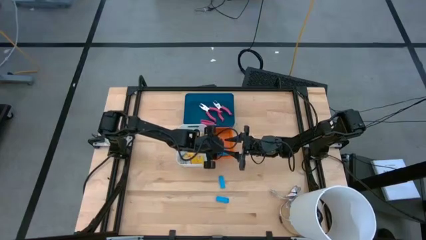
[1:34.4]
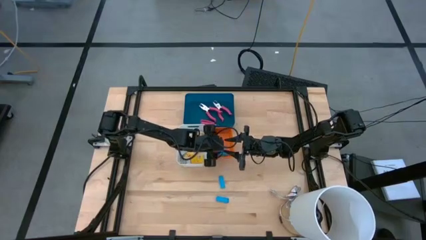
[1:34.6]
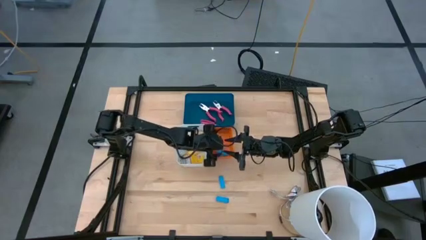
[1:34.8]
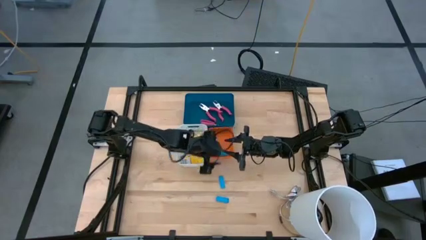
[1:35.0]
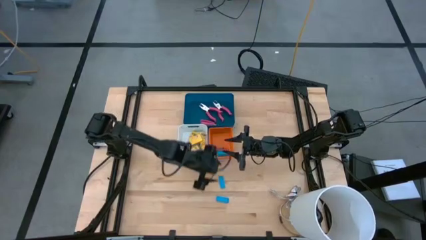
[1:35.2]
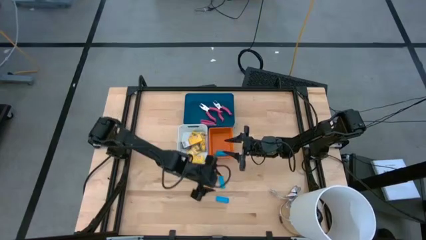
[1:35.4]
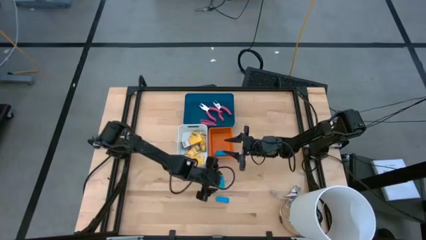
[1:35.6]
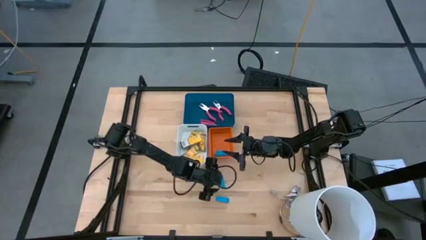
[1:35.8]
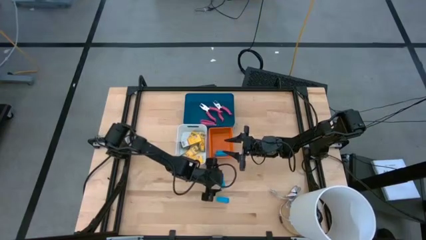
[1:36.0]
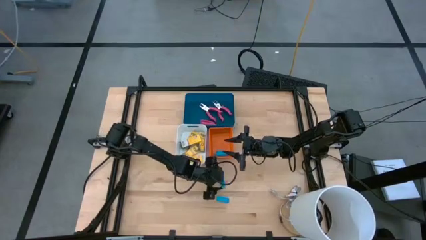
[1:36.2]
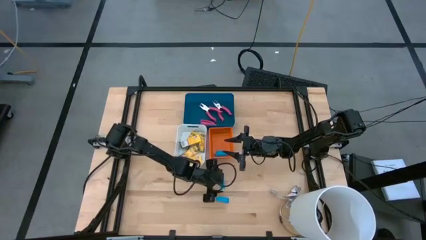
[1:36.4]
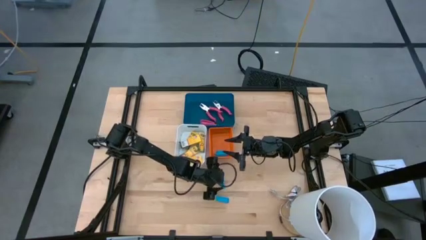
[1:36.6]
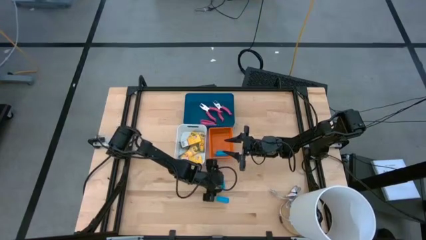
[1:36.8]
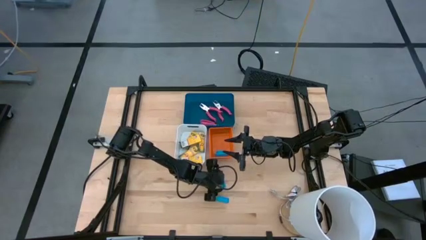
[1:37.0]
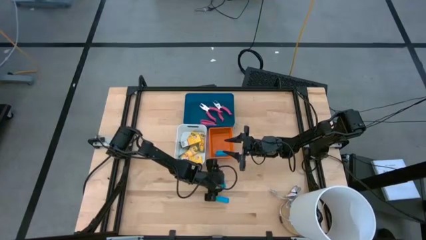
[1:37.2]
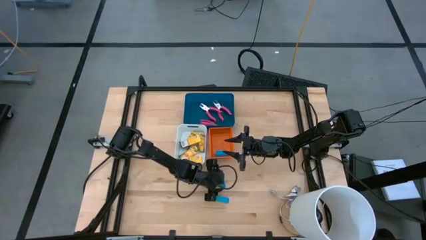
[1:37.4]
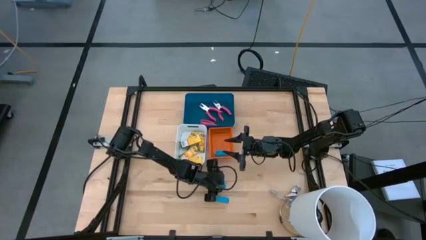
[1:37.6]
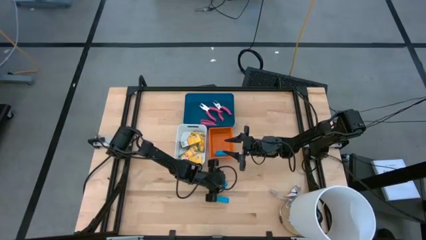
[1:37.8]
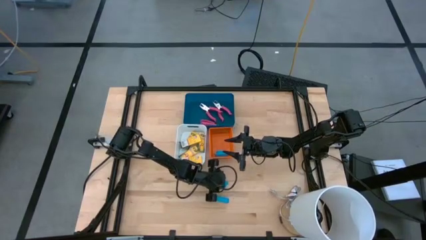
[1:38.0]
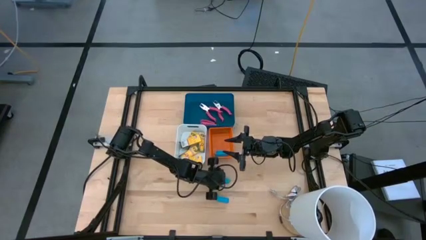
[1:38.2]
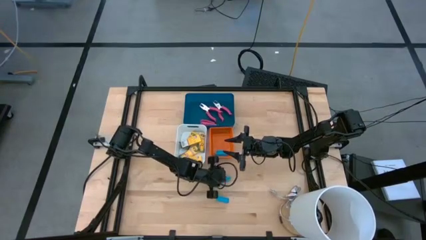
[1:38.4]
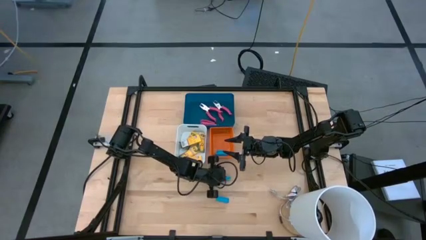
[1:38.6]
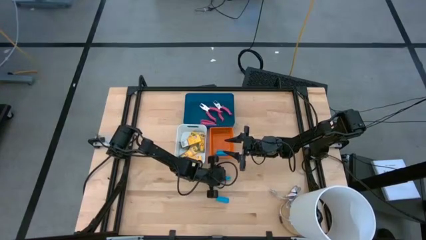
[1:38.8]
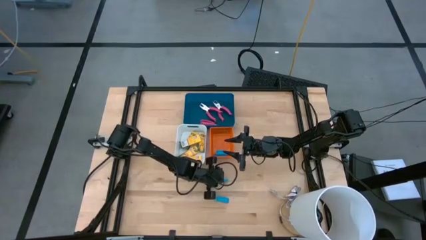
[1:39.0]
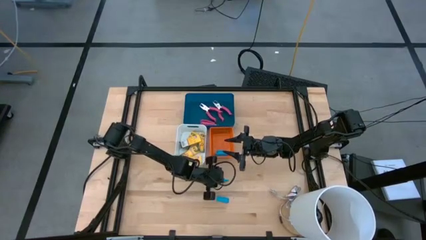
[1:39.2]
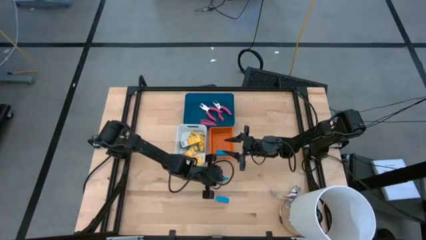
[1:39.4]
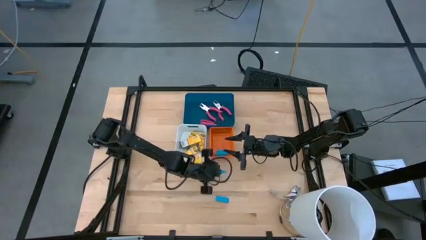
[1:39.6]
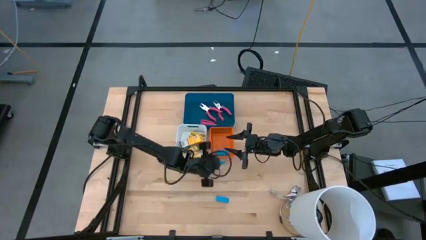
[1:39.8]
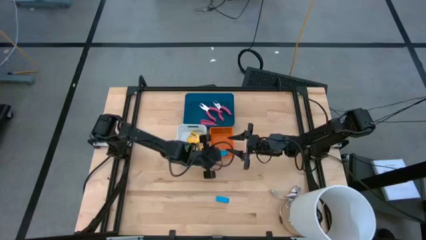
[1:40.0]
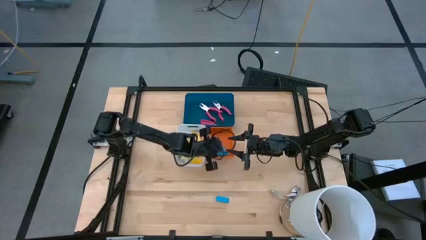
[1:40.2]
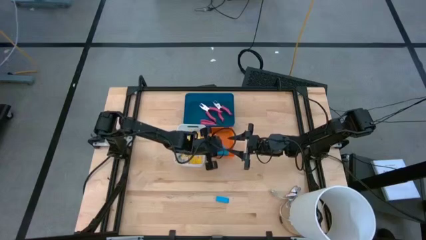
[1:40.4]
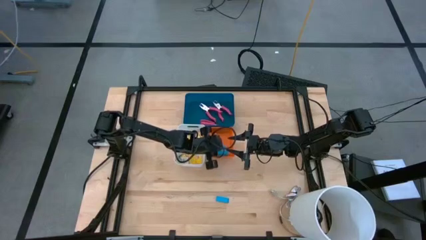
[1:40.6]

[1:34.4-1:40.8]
Task: Pick & Place School Supplies
Put the blue eraser into the orange bin

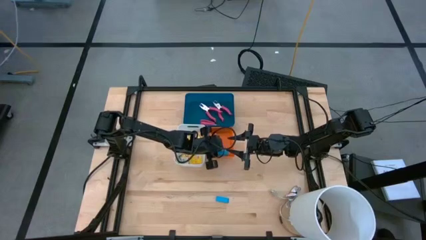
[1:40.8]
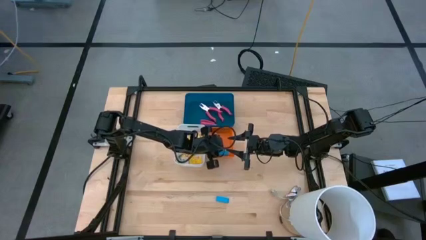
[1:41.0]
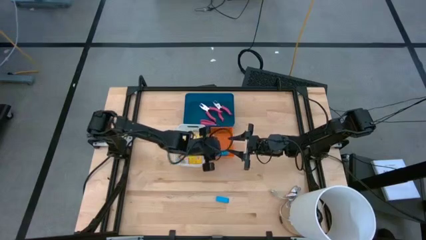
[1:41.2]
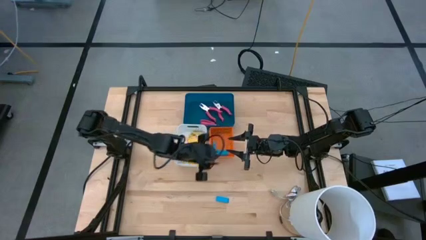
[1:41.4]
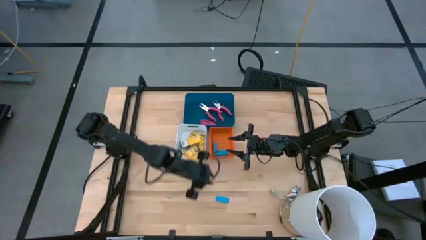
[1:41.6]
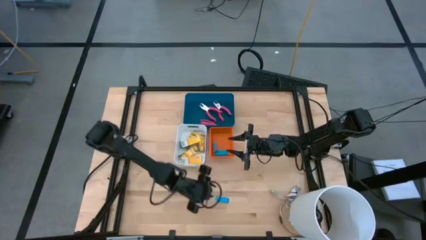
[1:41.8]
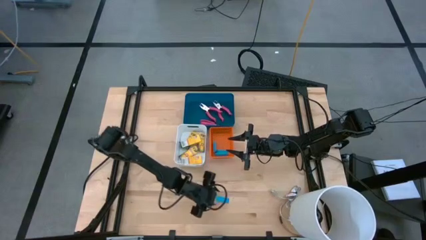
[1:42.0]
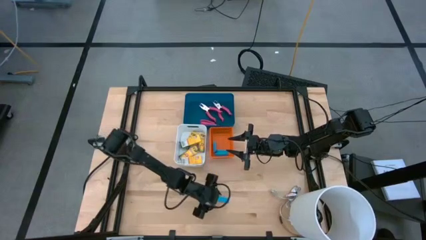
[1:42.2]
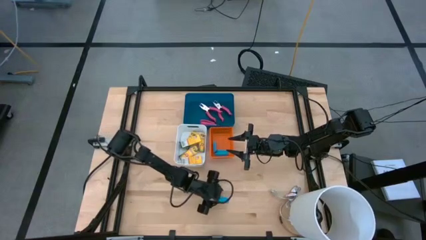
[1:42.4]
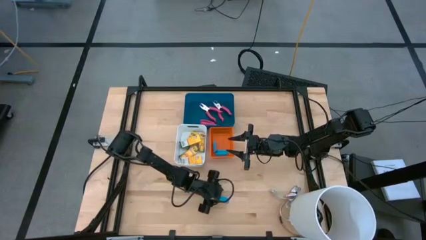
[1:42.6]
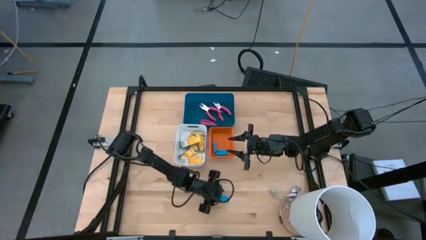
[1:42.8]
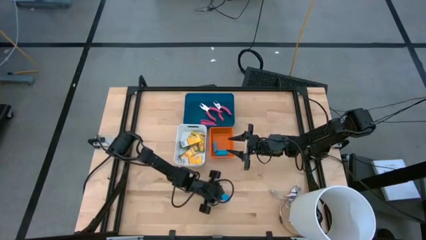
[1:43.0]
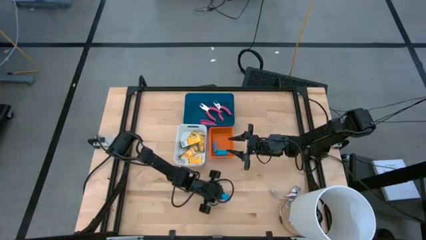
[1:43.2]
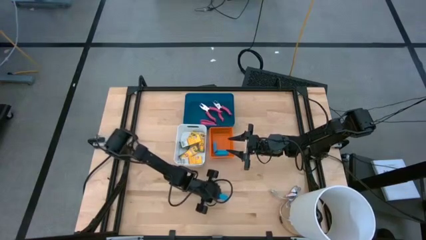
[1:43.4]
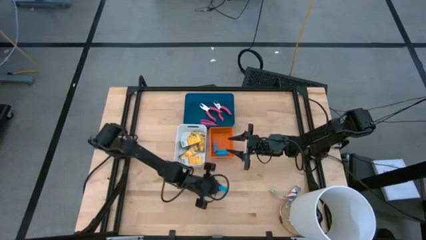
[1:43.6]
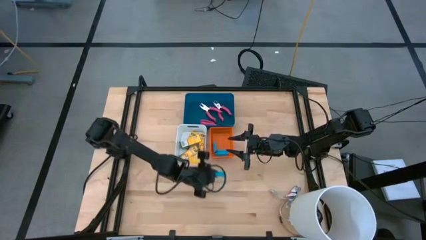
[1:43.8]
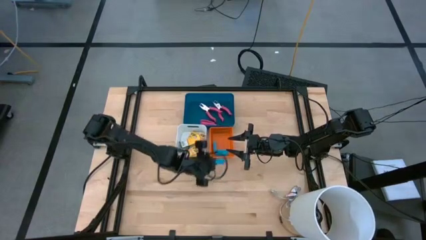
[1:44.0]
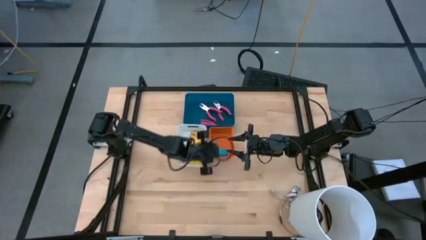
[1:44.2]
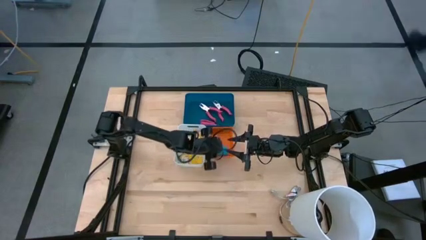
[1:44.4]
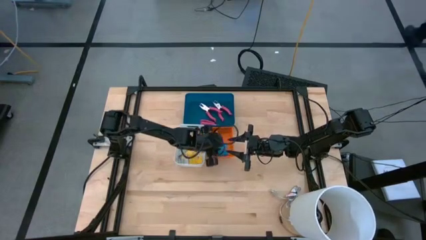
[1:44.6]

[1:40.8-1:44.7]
Put the blue eraser into the orange bin

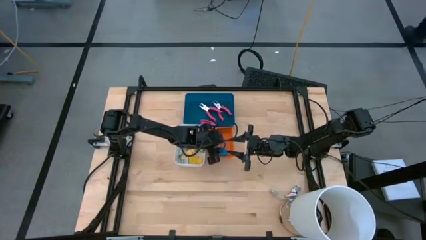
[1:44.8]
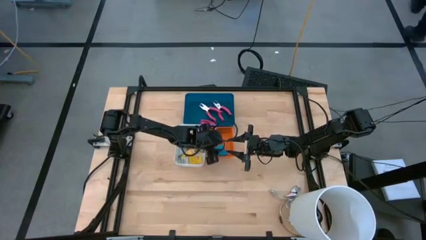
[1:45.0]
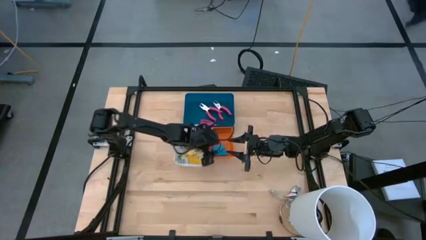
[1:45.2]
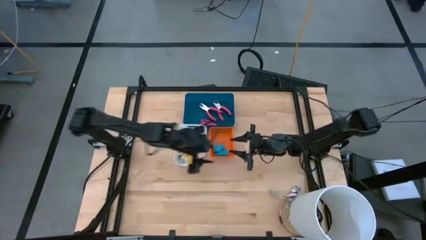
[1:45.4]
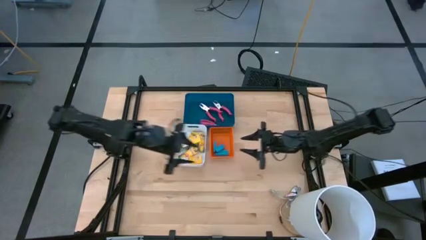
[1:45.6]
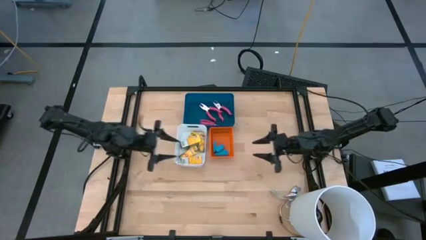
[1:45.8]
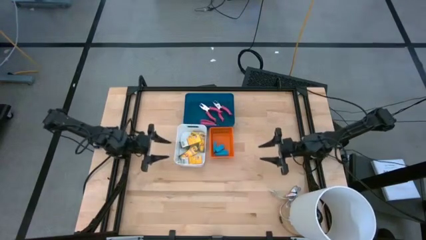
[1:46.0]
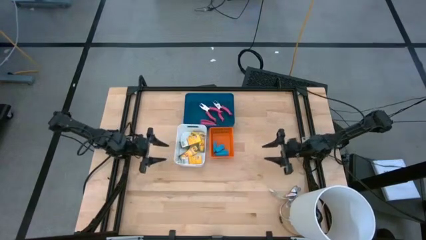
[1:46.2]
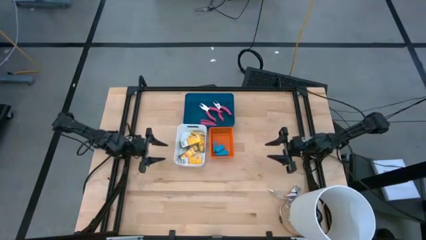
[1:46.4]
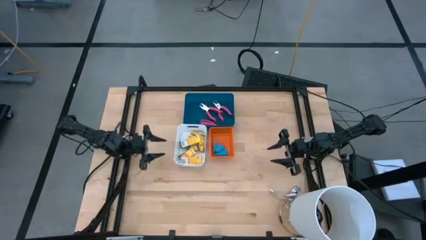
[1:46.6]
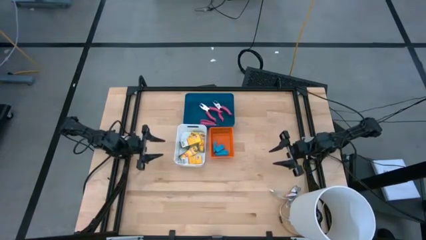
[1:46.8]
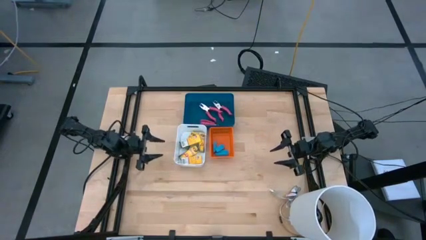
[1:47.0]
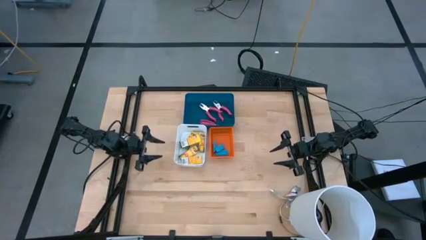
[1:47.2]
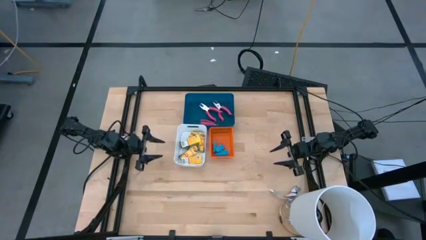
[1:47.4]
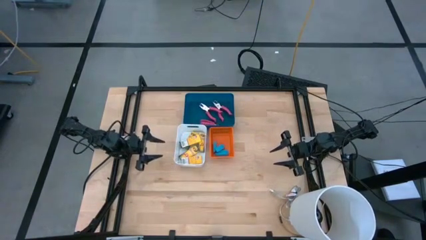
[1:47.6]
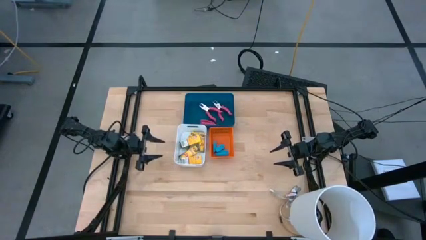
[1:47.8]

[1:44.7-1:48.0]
Return to Home Position

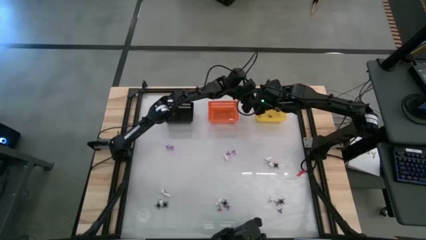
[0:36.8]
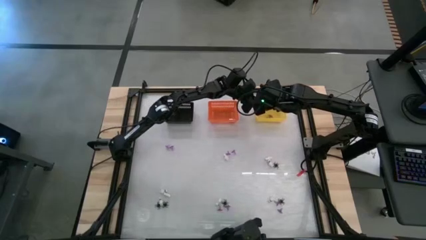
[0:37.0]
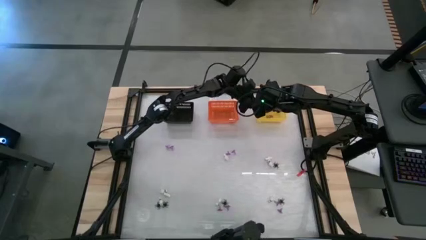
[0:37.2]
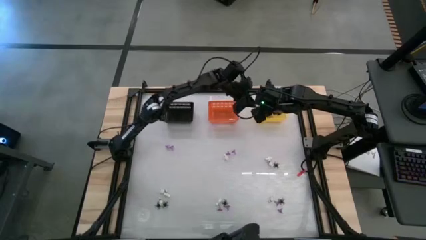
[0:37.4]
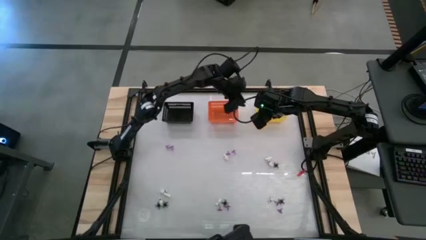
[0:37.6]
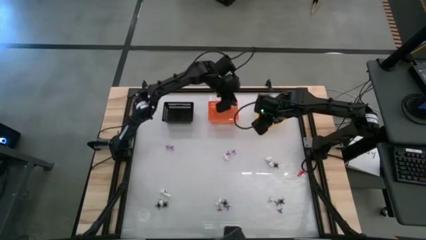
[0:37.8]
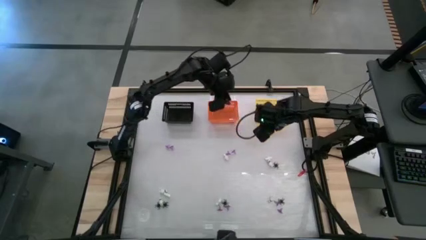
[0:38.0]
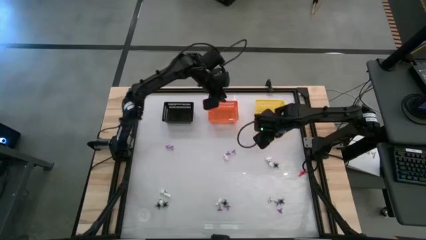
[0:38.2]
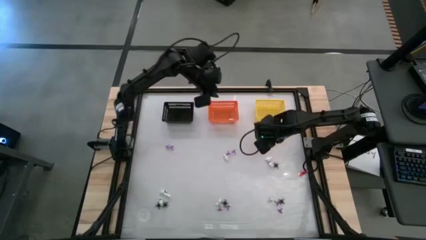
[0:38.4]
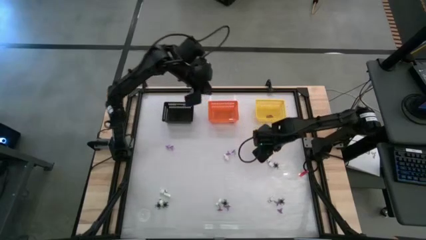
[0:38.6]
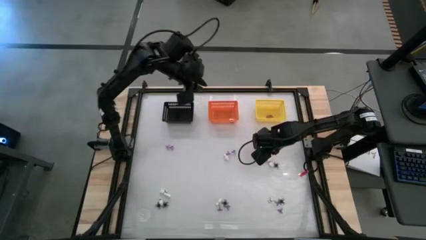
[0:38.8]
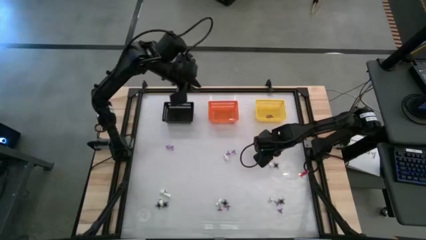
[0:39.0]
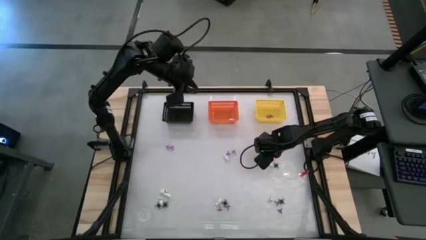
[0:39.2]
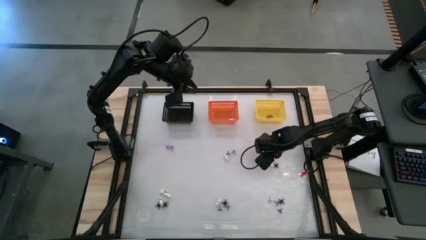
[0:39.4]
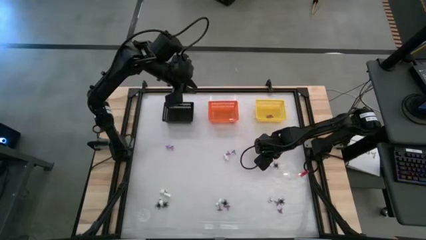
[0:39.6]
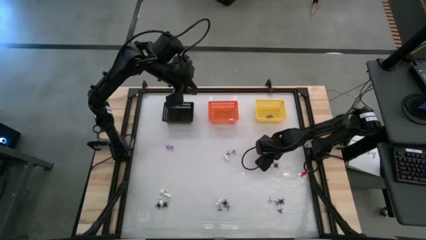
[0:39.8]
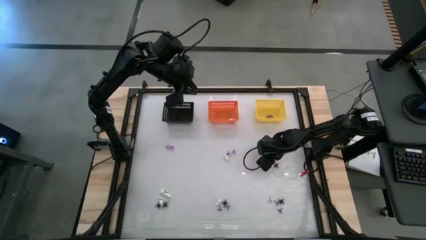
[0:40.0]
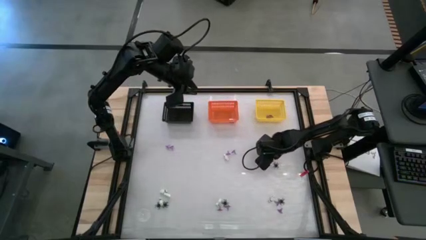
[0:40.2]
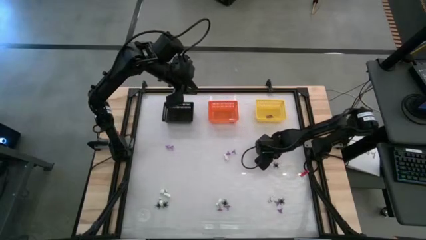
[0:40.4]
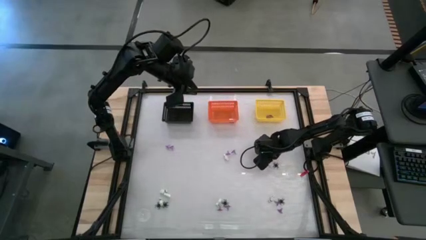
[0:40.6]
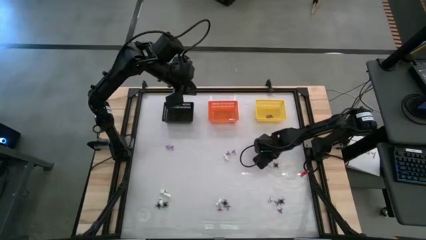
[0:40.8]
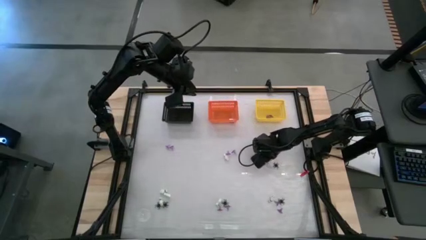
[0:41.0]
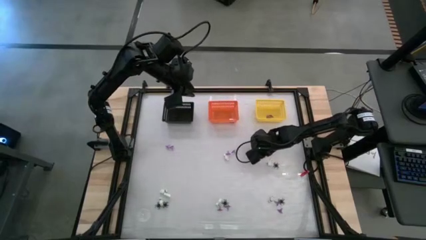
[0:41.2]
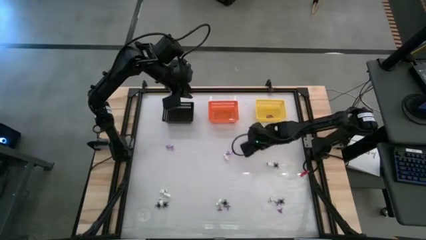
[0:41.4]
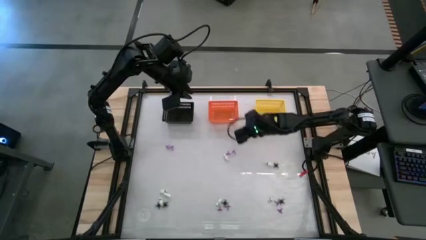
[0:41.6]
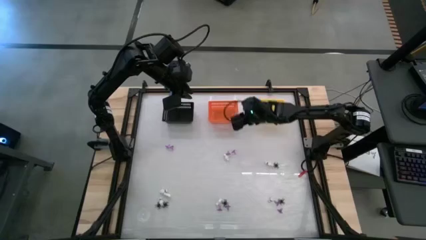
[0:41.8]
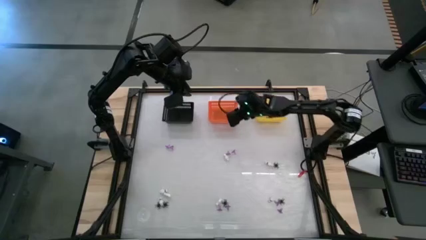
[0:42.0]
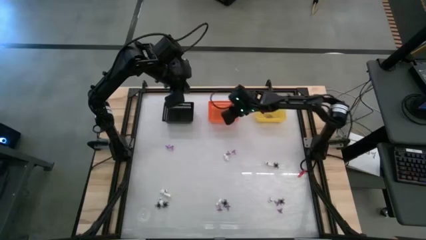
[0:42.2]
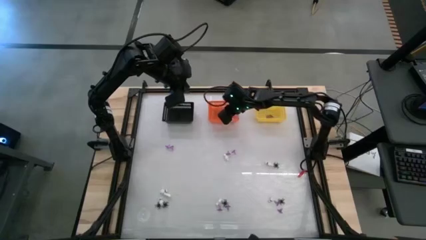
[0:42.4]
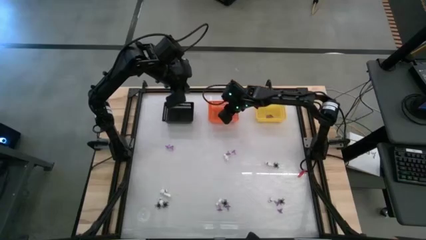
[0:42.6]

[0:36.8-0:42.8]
Task: Sort Halloween decoration
Put the skeleton toy into the orange bin
